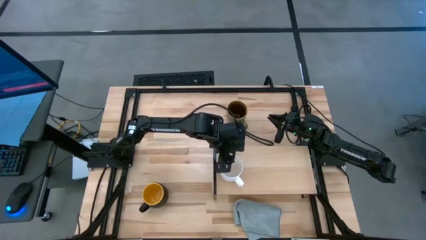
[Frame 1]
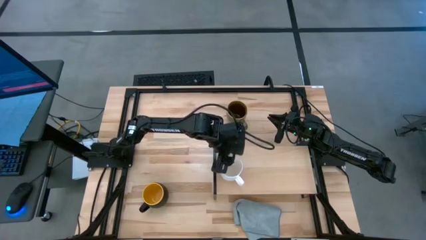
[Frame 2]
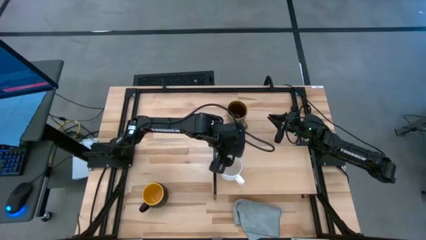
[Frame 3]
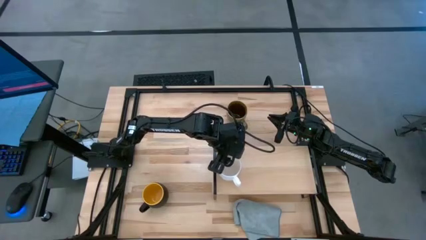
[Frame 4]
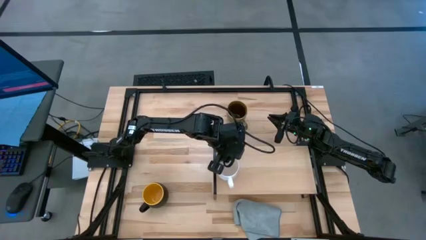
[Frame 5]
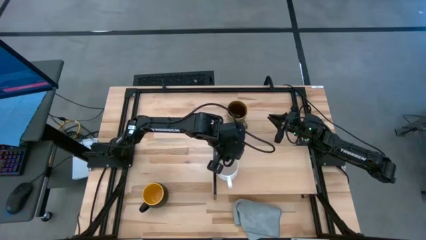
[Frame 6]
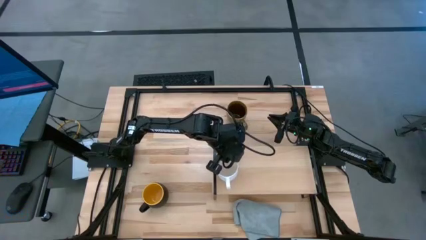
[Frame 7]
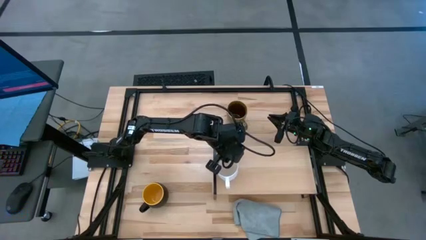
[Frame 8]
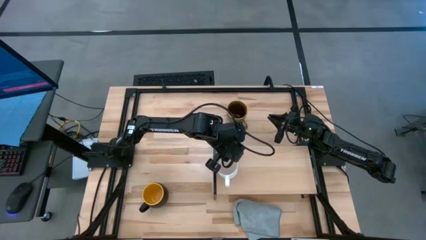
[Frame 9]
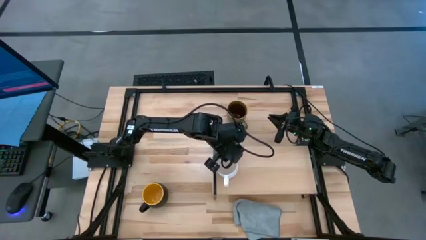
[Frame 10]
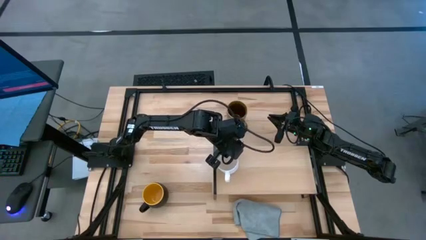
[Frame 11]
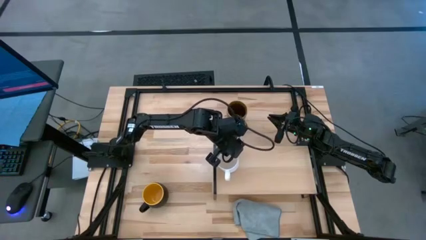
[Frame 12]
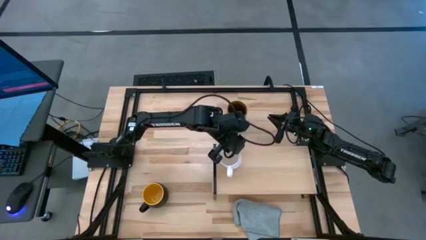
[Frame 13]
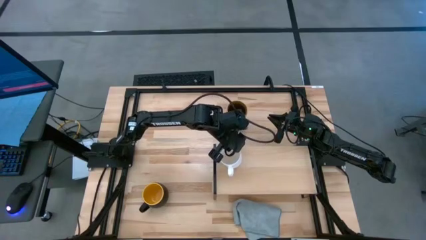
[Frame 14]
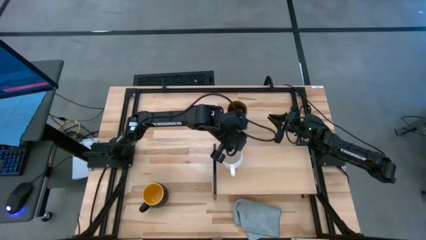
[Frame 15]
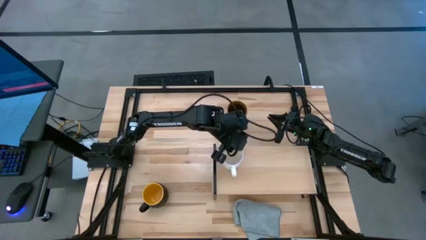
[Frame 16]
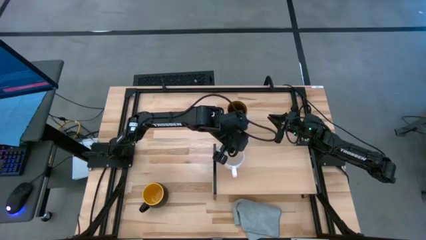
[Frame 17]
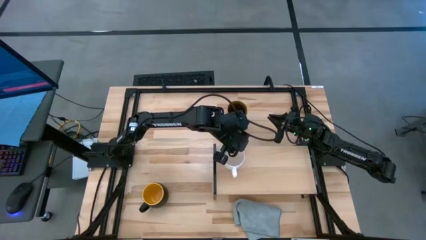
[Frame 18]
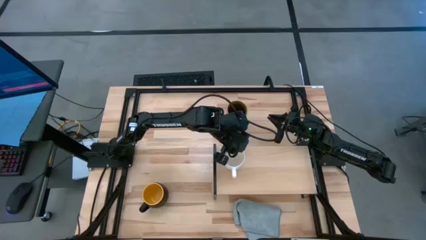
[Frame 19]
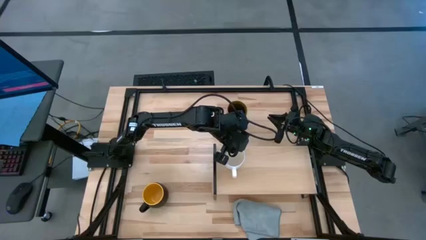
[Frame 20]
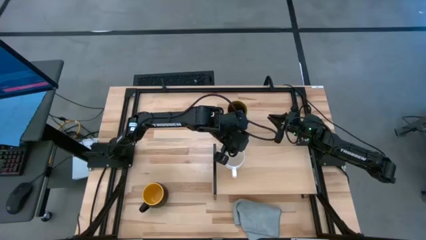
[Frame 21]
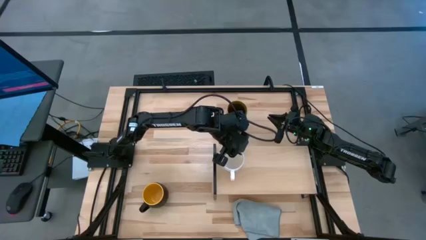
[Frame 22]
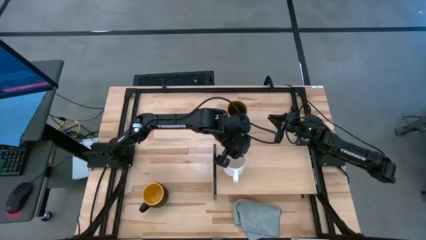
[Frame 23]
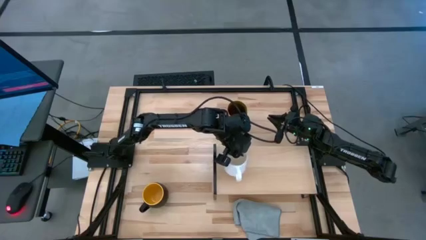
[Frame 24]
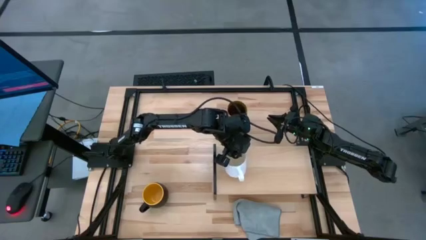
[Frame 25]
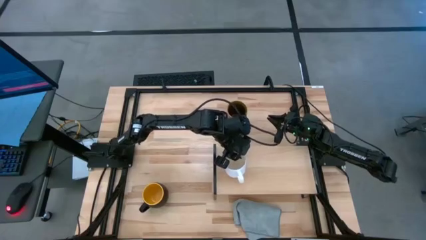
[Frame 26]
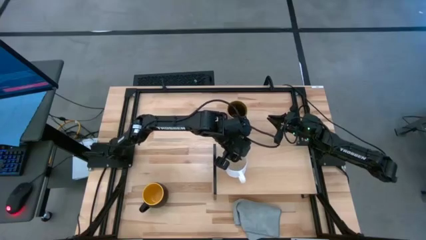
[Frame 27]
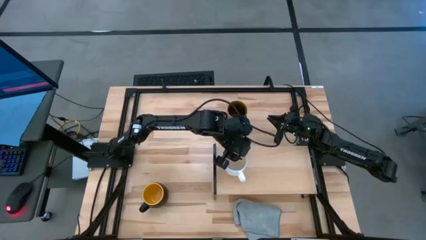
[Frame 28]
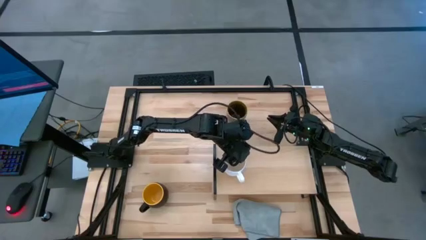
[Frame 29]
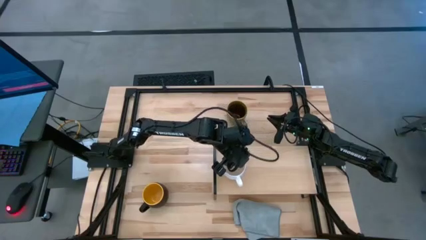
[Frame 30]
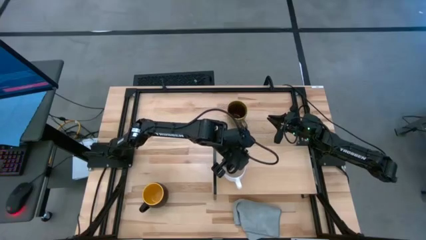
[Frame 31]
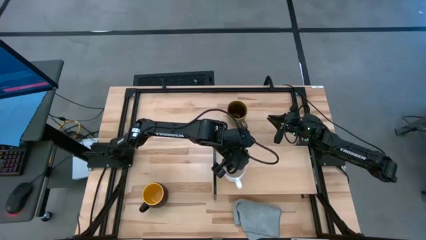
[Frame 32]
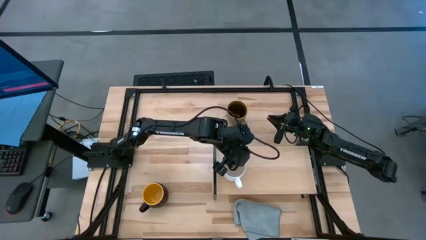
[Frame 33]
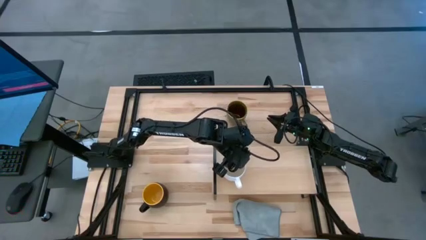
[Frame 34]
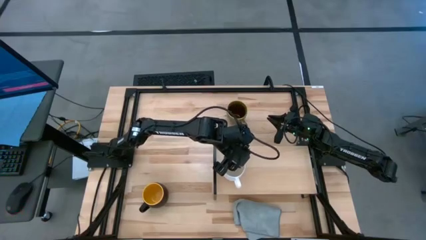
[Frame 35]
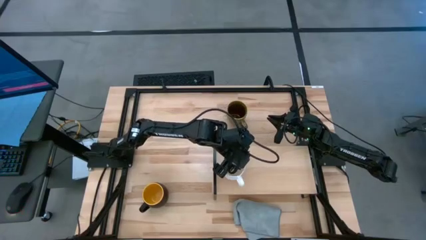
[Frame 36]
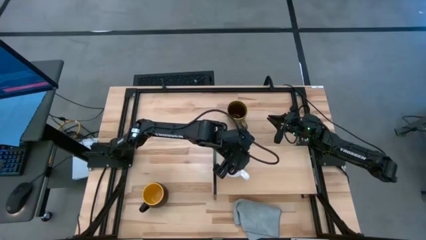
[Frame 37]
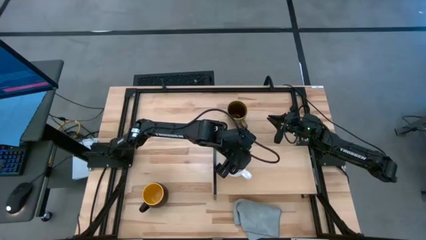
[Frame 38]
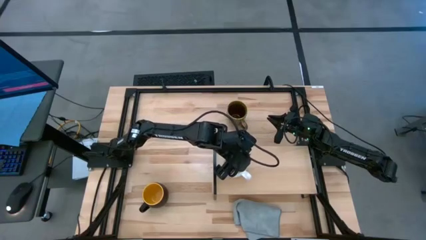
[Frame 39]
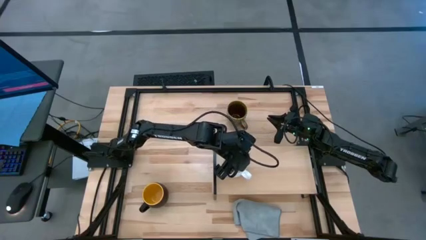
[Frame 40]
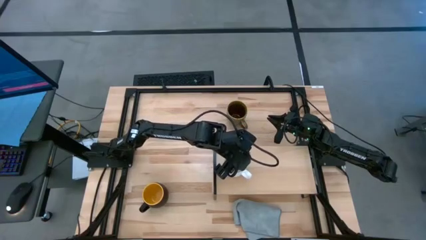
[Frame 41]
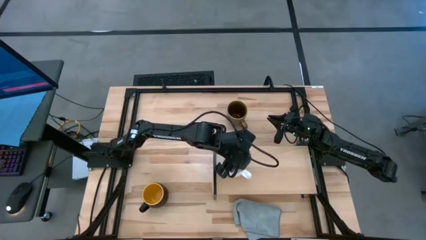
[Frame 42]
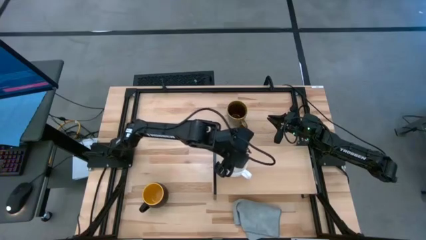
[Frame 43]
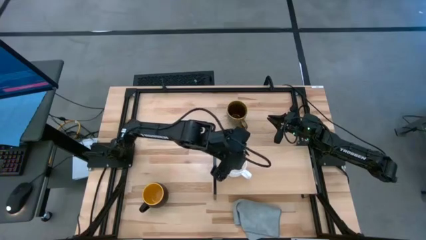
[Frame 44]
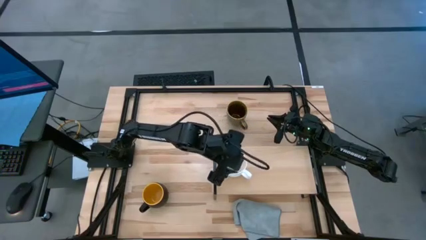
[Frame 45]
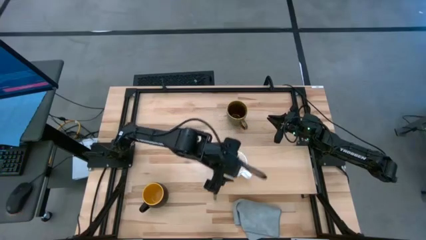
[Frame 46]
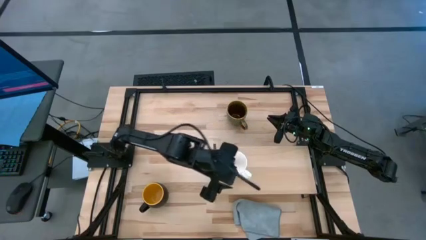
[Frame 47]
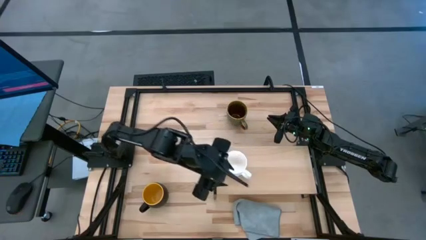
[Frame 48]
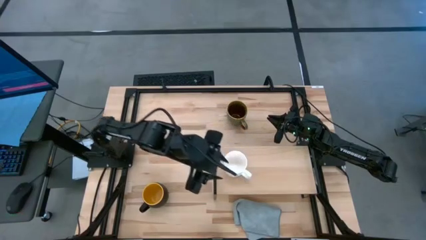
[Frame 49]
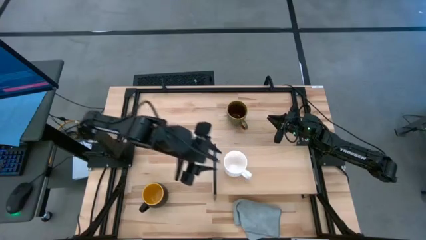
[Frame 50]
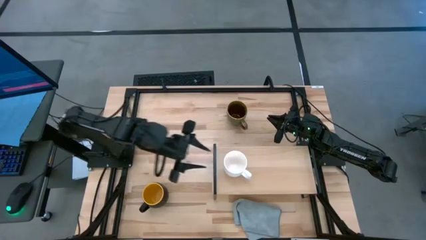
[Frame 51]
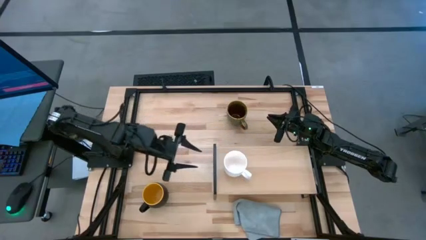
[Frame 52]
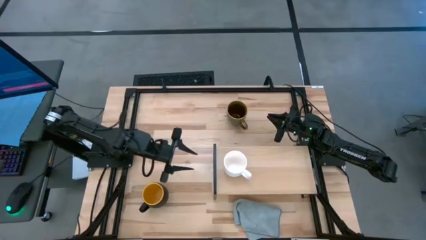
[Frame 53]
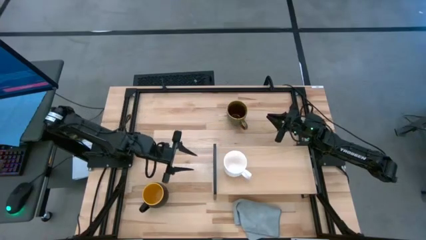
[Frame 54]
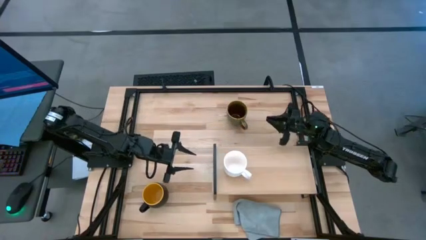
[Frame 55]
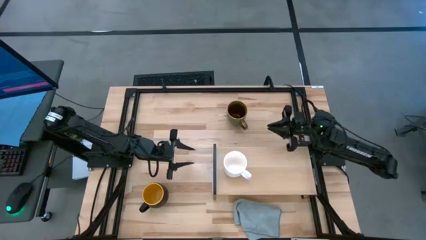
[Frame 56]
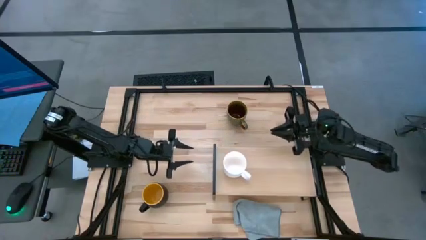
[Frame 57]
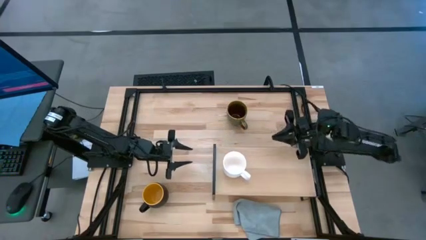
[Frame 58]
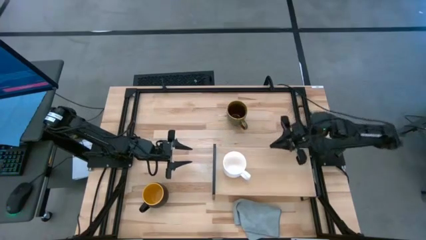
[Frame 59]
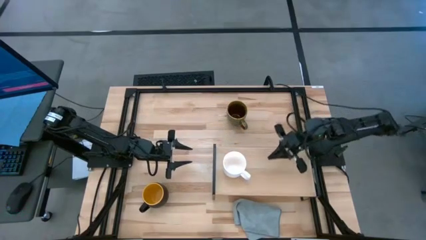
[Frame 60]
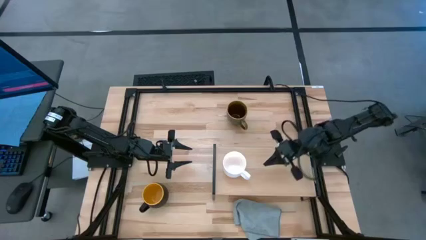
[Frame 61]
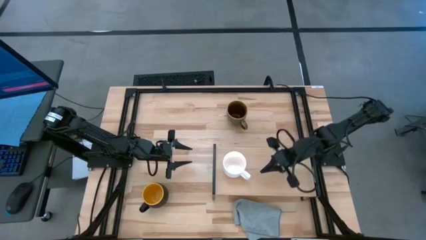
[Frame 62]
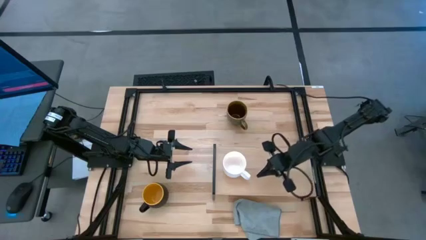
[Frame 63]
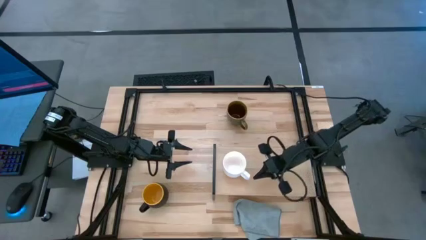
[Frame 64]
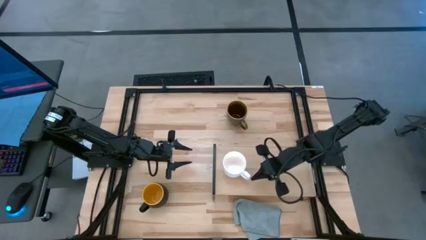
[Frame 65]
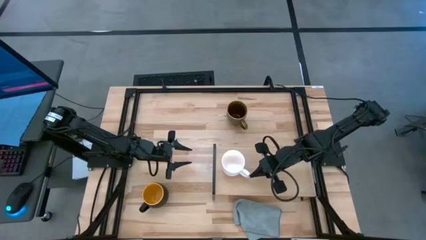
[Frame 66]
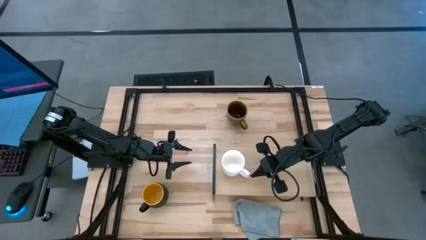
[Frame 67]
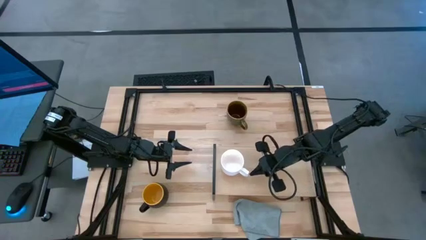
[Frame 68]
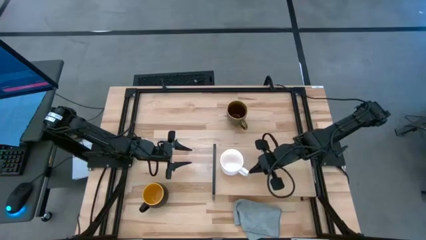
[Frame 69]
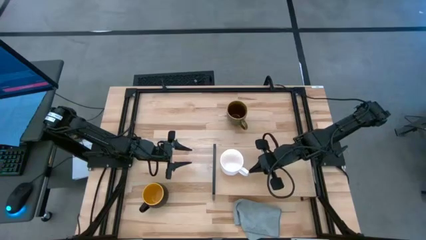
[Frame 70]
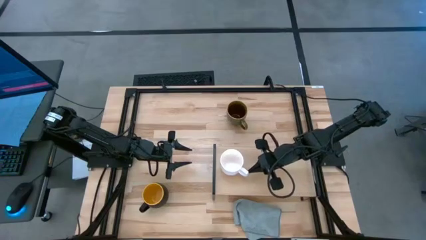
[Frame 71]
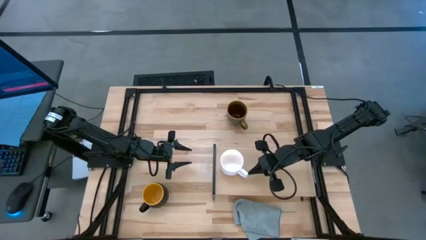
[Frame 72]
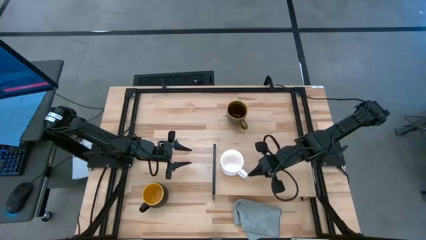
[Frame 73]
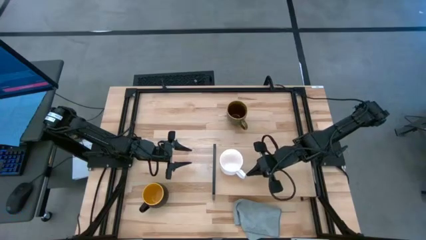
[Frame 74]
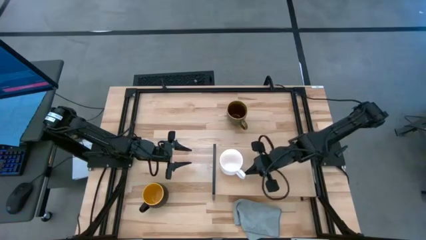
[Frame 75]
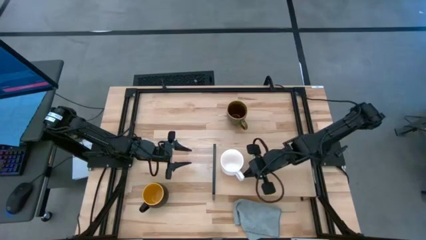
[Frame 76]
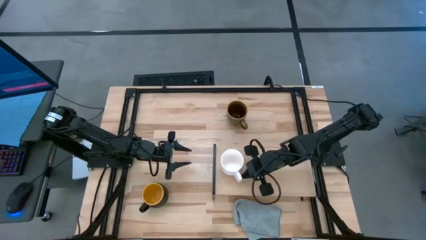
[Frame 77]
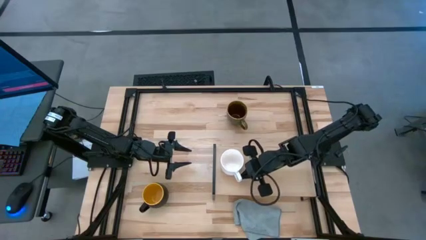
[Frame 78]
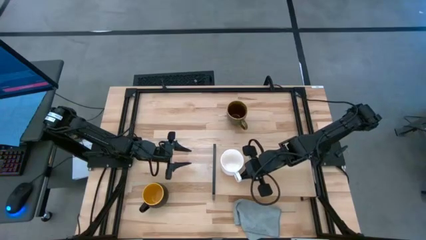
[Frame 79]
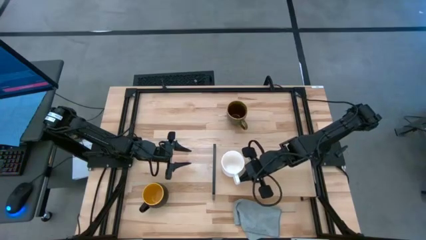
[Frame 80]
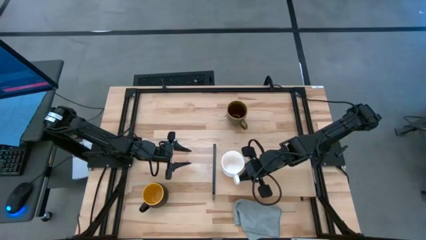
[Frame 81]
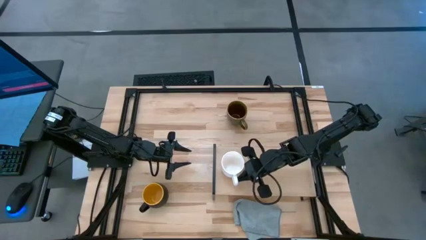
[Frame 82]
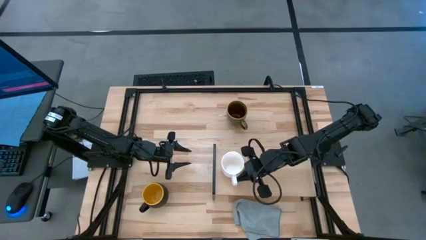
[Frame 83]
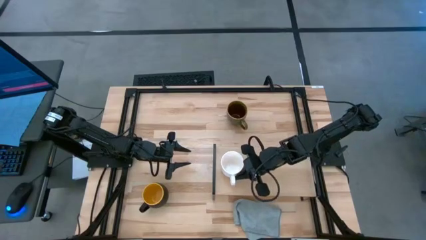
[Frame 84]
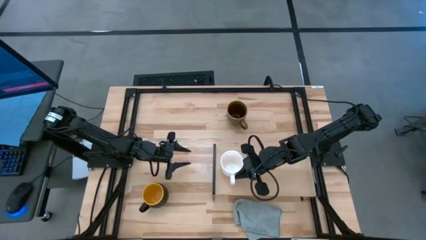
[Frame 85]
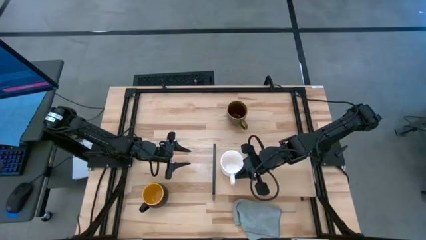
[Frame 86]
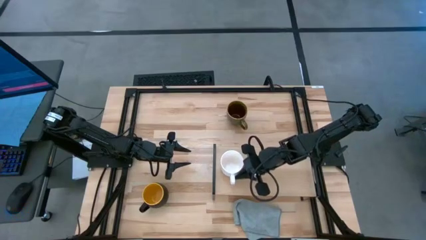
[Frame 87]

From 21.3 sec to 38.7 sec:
Task: Stack small to large cups/mugs on shelf
Put the white mug on the shelf
